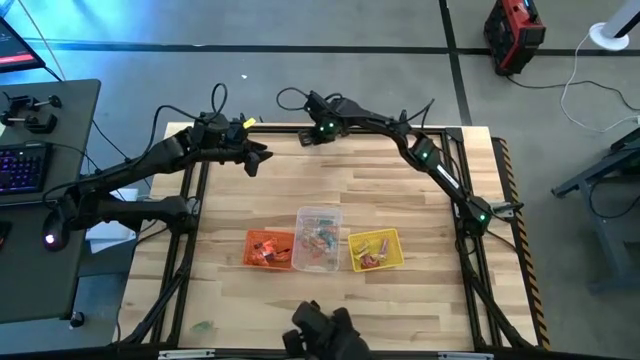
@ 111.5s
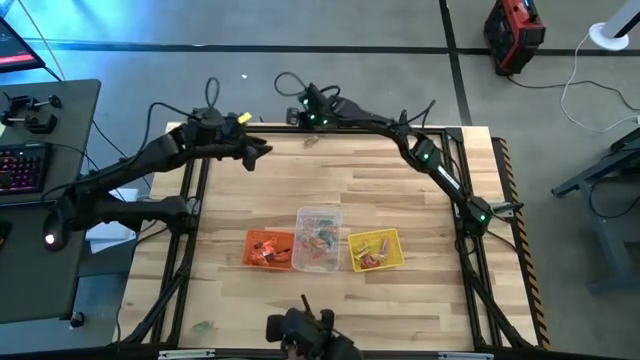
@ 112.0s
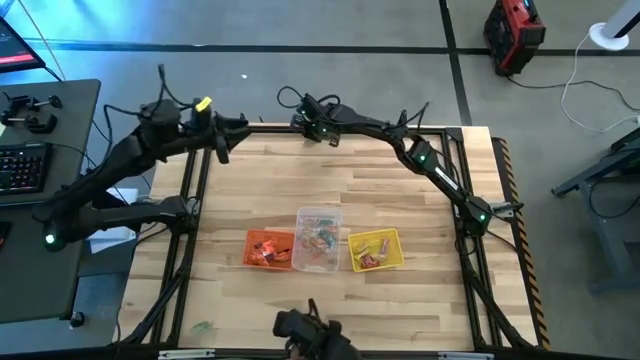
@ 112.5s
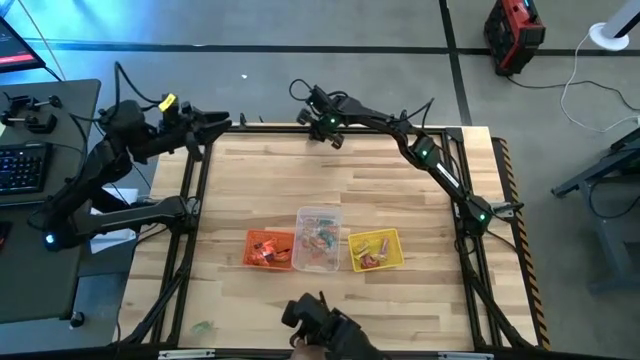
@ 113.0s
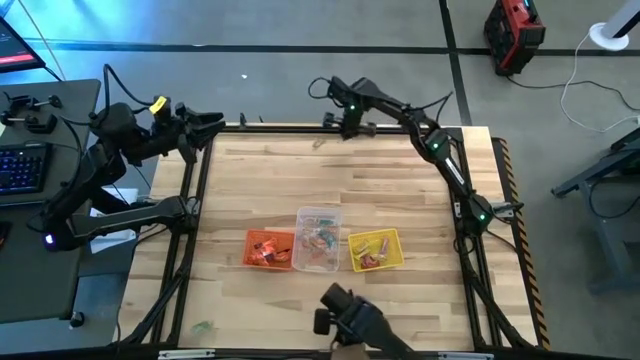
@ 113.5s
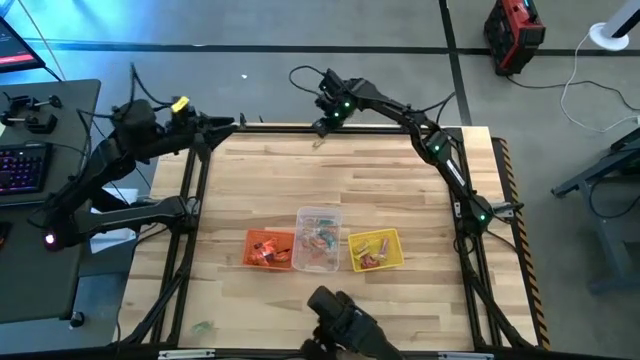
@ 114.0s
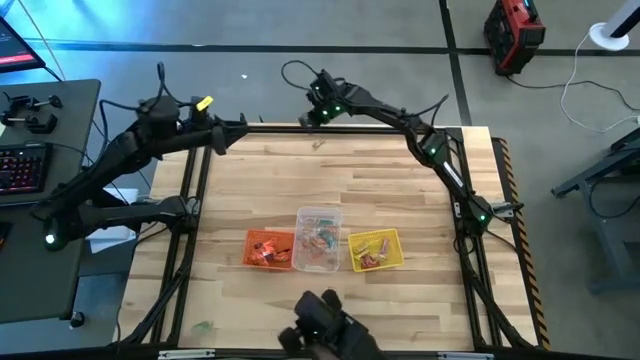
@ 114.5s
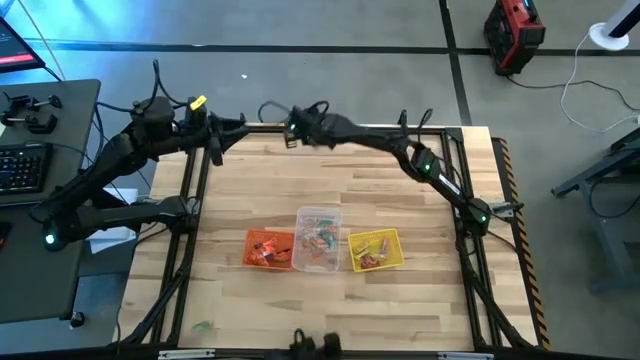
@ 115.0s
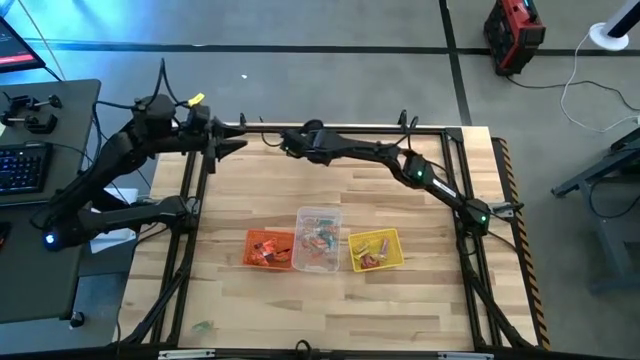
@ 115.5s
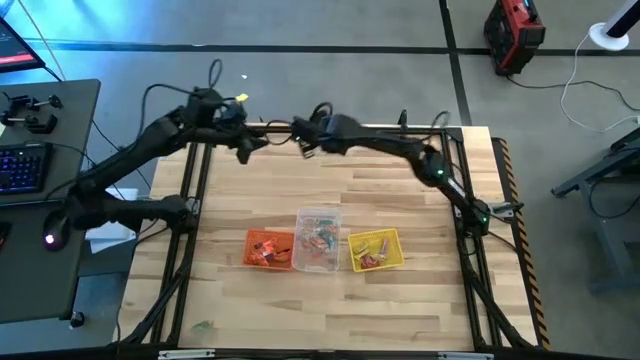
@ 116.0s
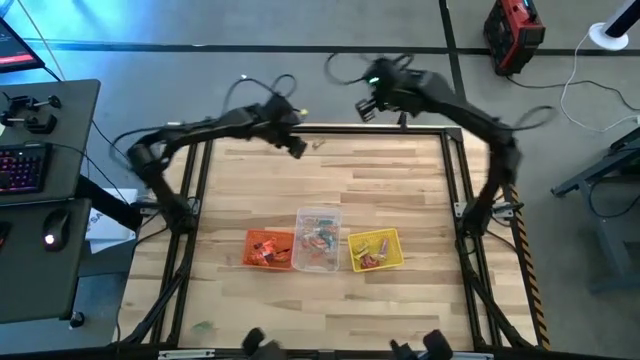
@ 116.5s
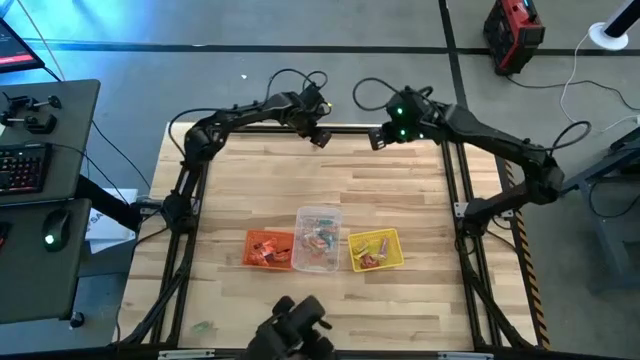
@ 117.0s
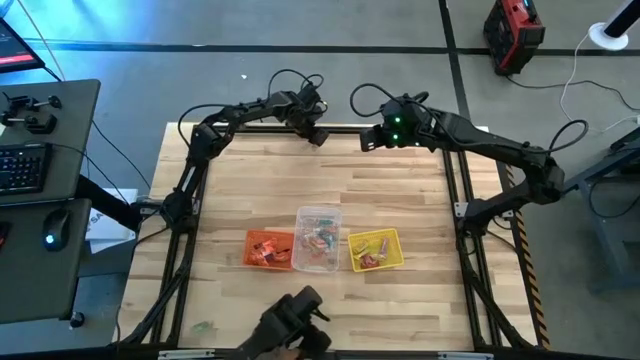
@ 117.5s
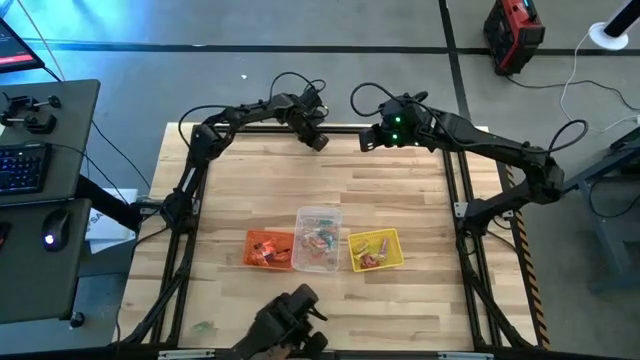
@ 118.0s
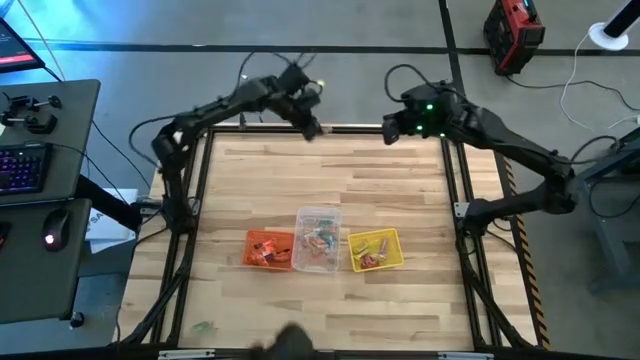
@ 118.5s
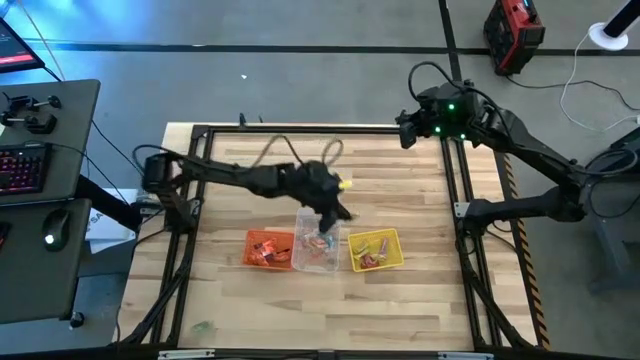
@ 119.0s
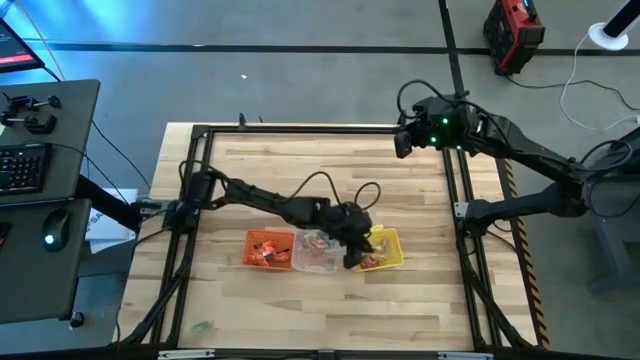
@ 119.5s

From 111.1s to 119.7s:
Task: Sort candy by brand, put in halloween buckets
Put the yellow candy into the yellow bin

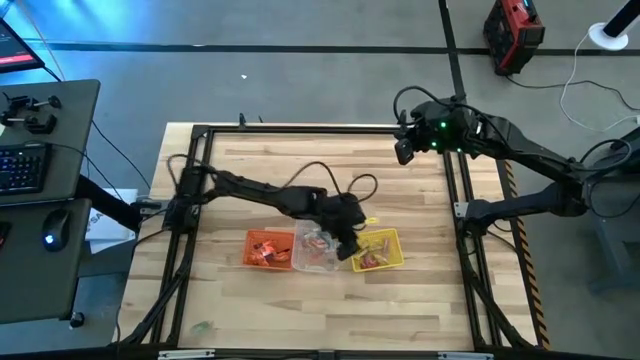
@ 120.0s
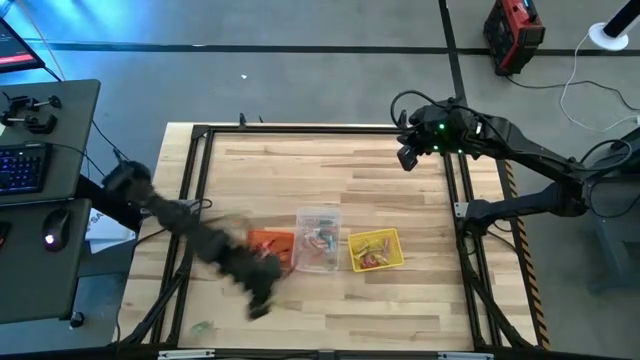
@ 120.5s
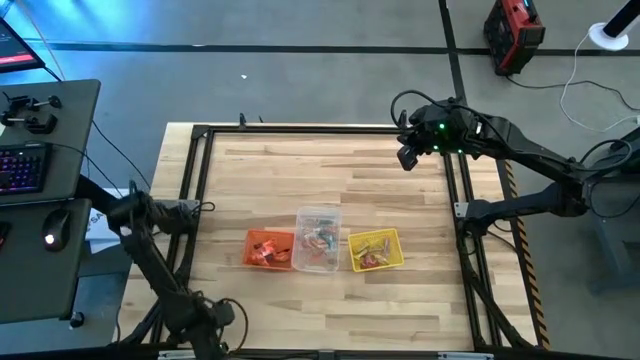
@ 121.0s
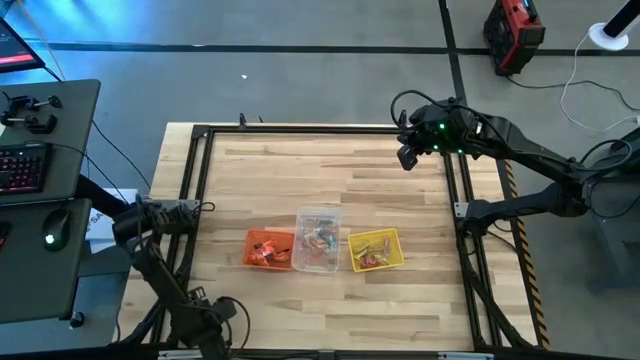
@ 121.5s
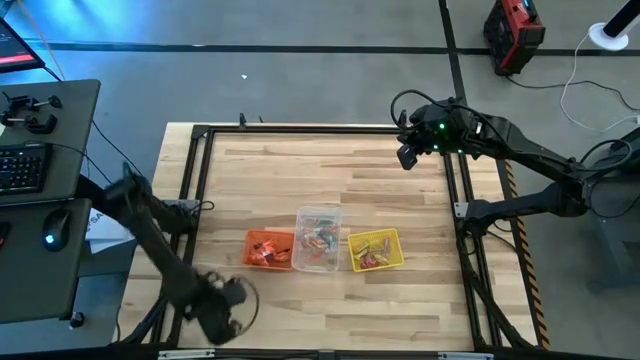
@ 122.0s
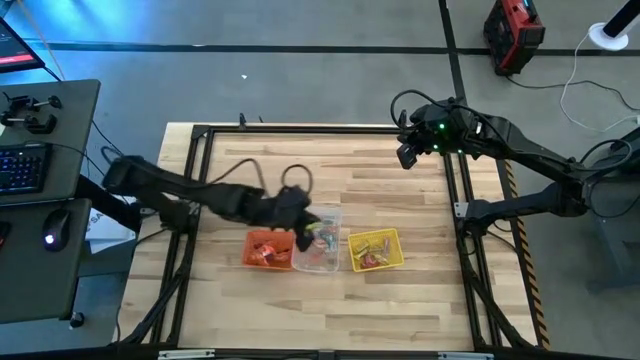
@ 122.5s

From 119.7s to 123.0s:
Put the green gummy into the transparent bin

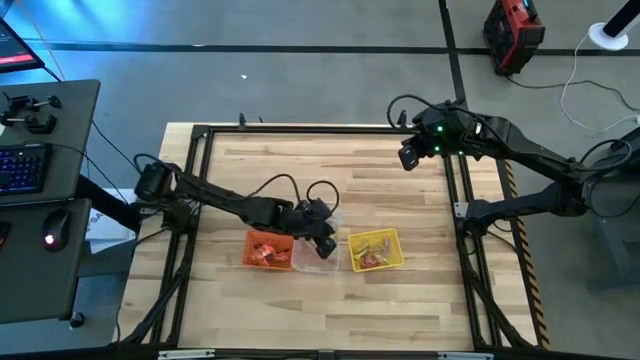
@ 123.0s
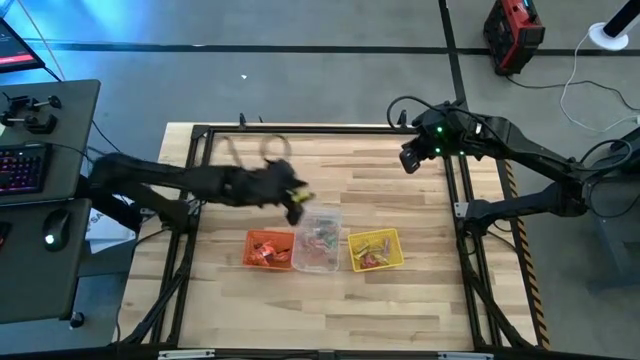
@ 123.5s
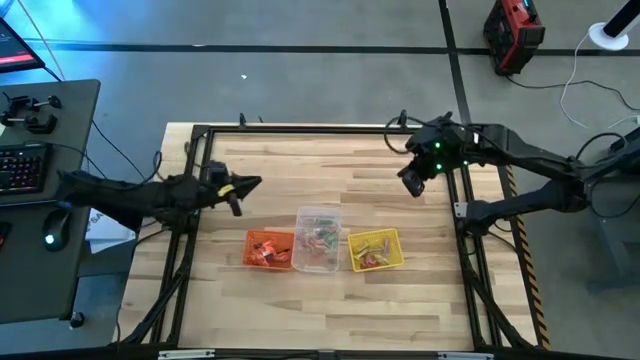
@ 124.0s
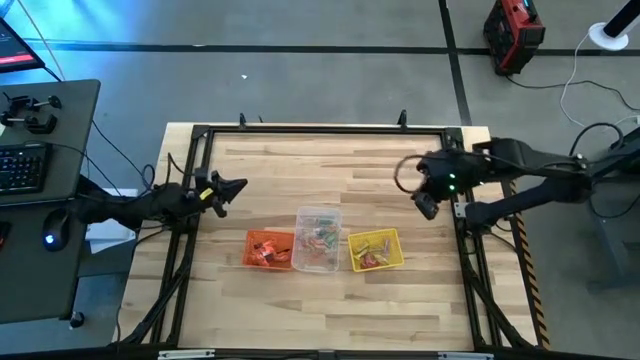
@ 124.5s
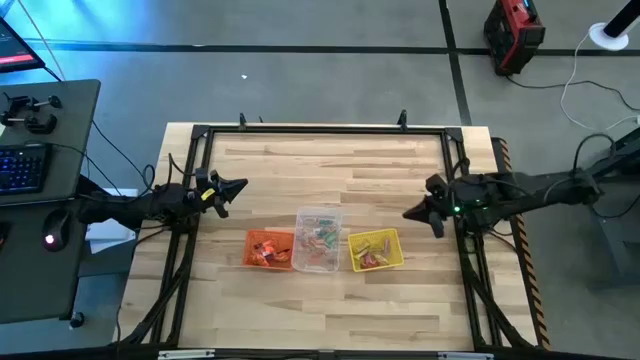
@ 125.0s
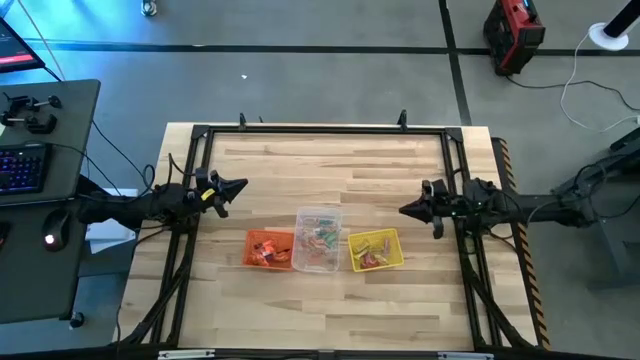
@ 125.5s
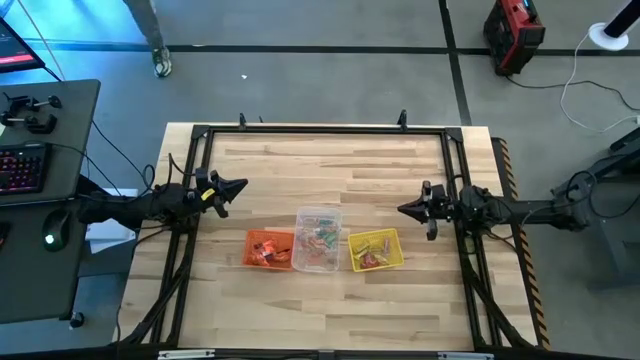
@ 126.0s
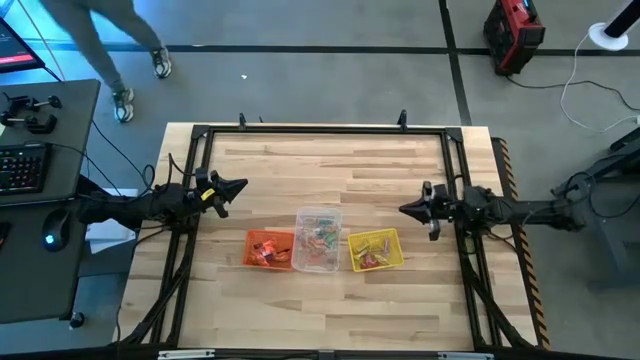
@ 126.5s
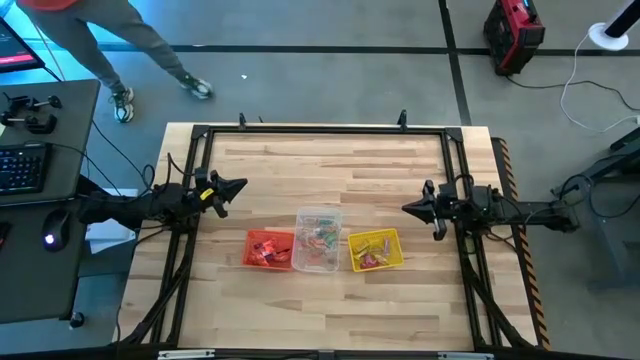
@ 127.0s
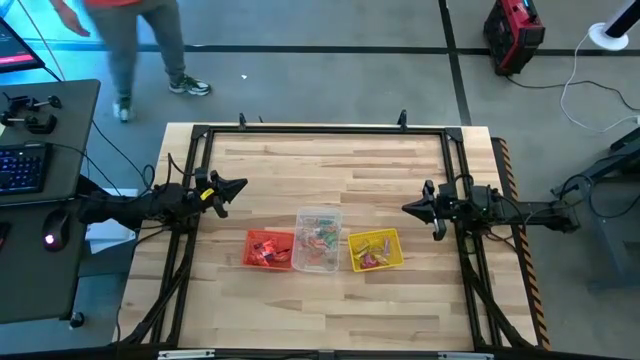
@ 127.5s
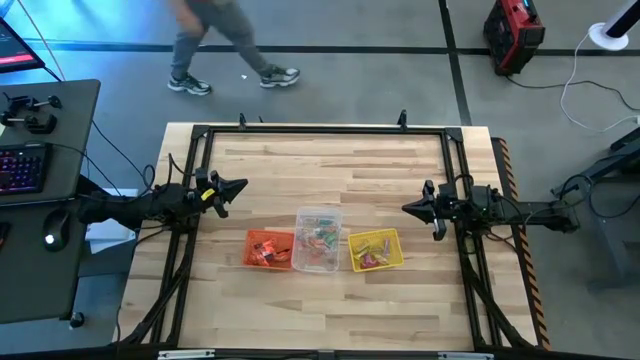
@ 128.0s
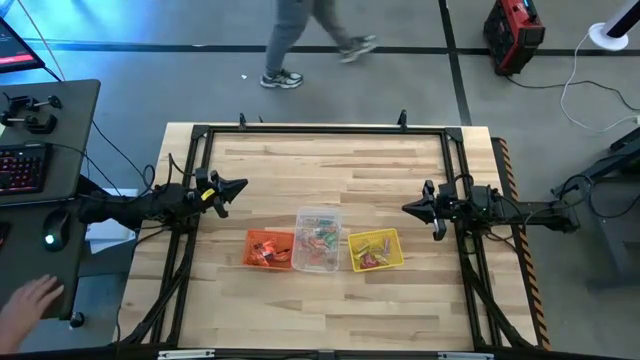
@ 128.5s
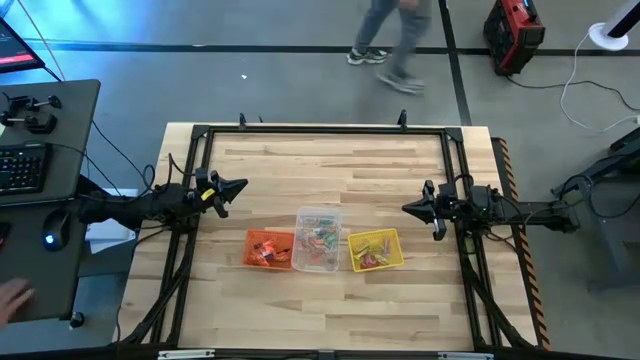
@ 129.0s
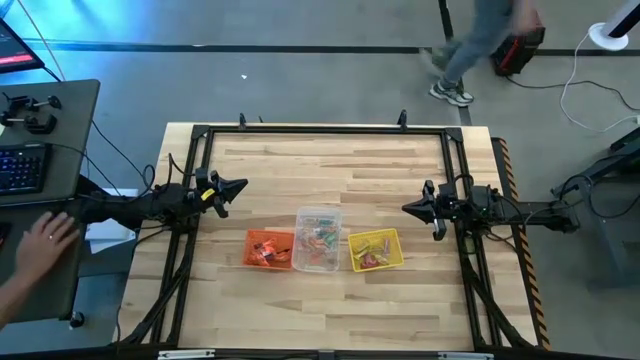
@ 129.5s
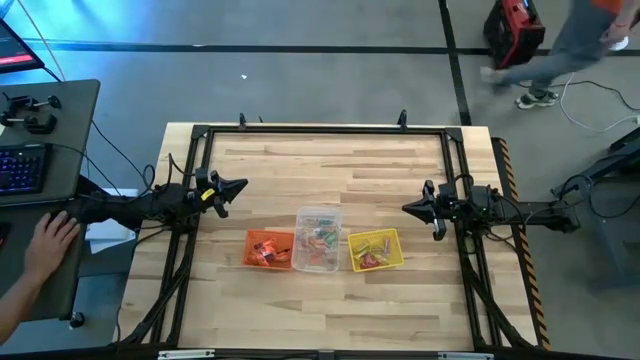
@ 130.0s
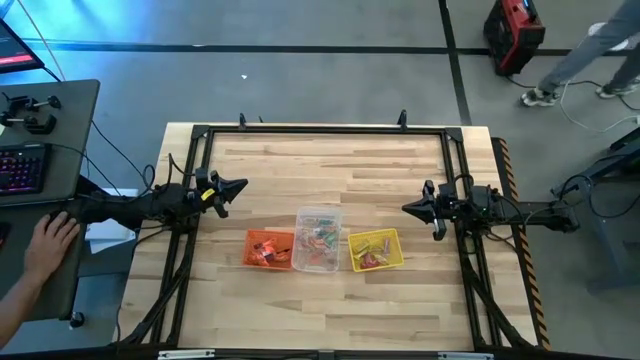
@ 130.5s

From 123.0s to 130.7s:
Return to Home Position
